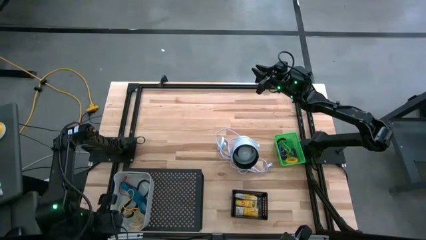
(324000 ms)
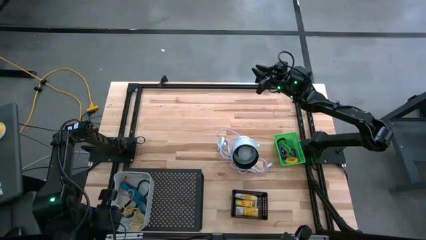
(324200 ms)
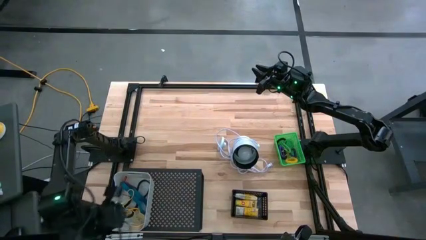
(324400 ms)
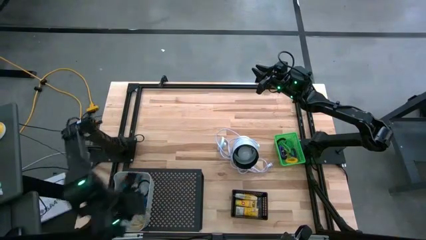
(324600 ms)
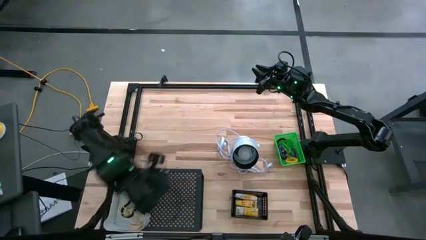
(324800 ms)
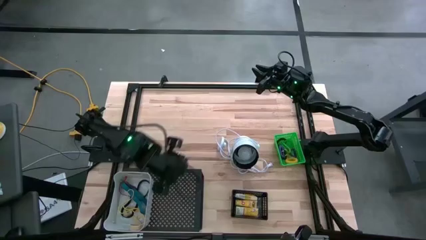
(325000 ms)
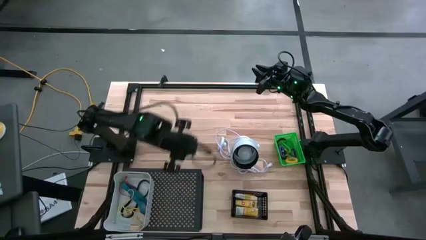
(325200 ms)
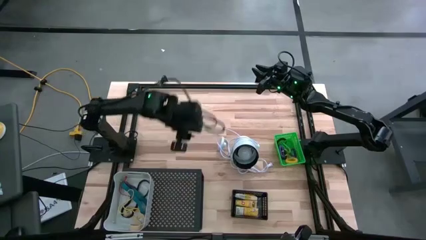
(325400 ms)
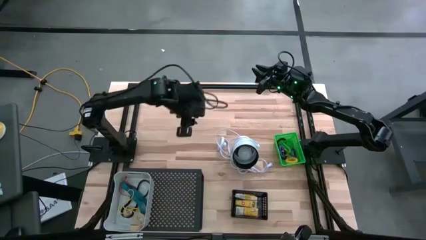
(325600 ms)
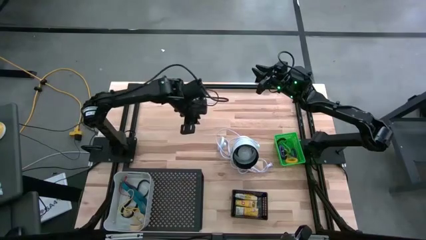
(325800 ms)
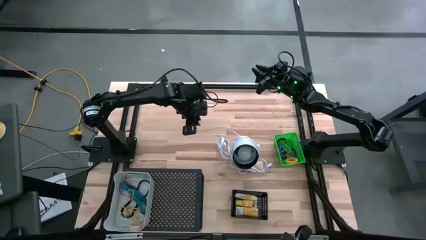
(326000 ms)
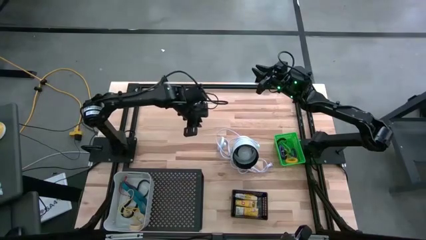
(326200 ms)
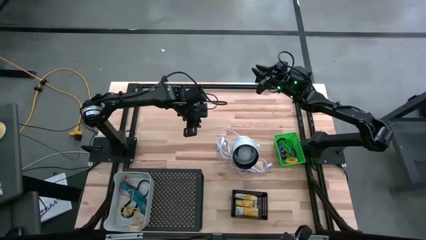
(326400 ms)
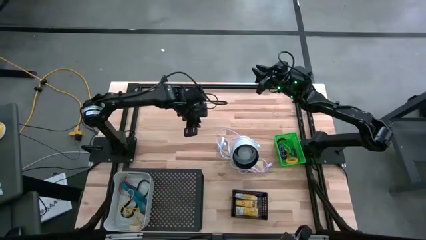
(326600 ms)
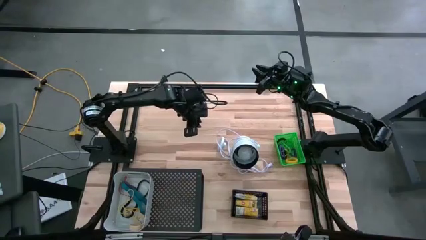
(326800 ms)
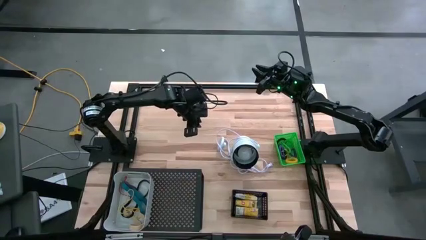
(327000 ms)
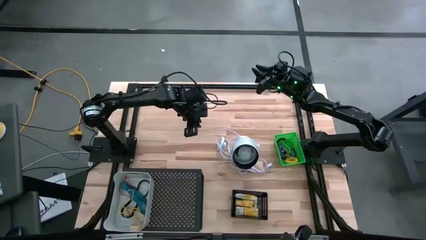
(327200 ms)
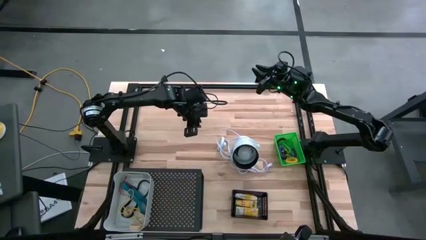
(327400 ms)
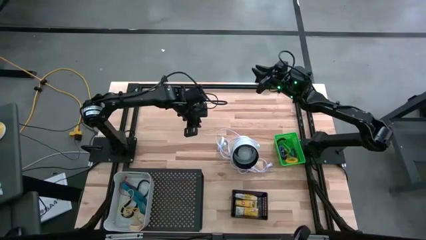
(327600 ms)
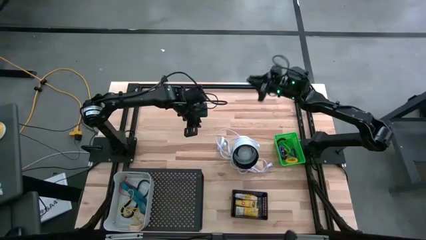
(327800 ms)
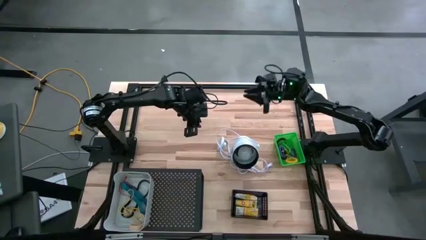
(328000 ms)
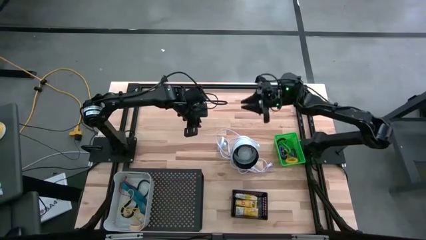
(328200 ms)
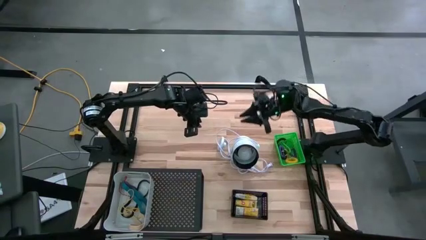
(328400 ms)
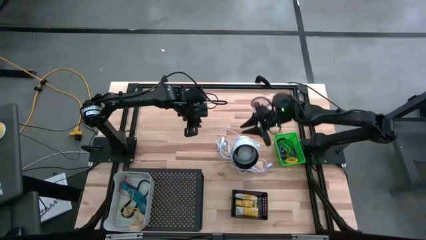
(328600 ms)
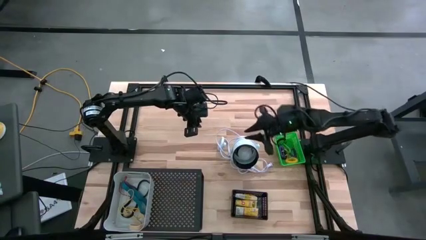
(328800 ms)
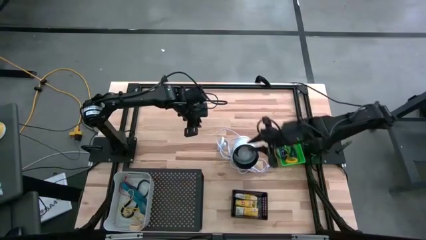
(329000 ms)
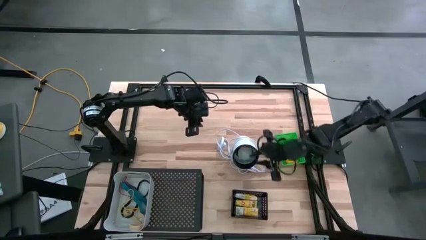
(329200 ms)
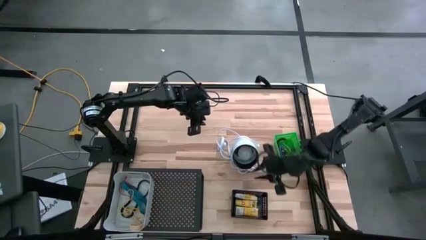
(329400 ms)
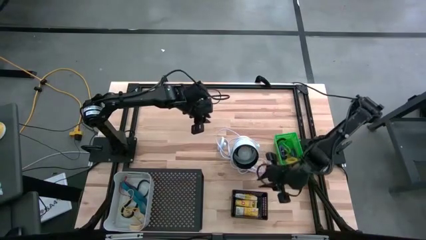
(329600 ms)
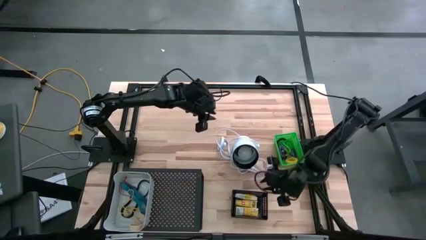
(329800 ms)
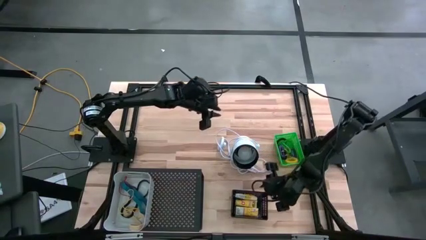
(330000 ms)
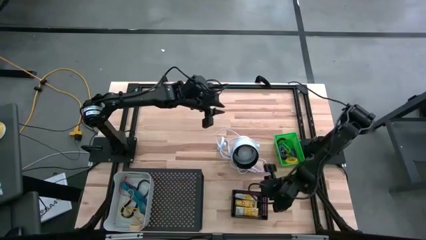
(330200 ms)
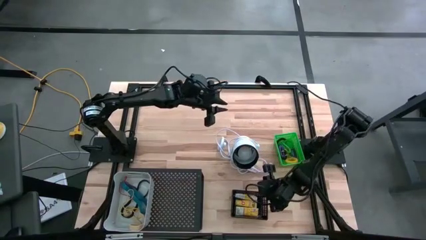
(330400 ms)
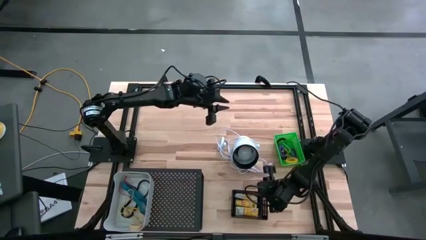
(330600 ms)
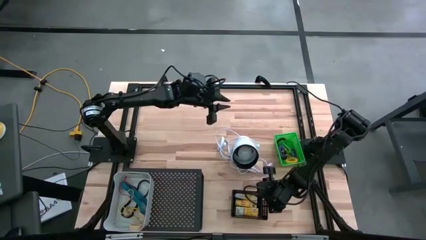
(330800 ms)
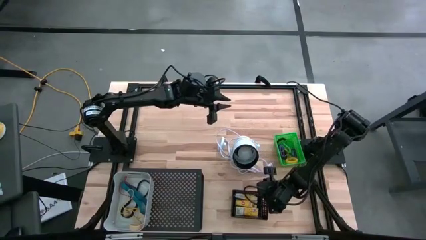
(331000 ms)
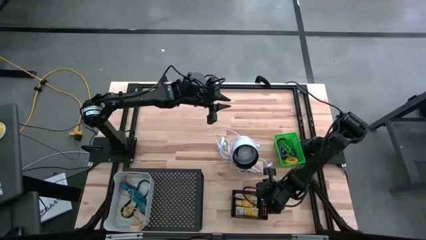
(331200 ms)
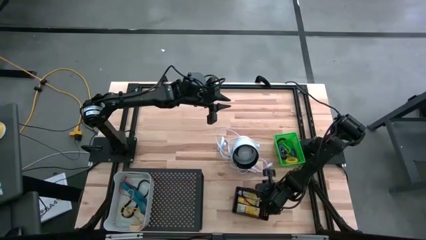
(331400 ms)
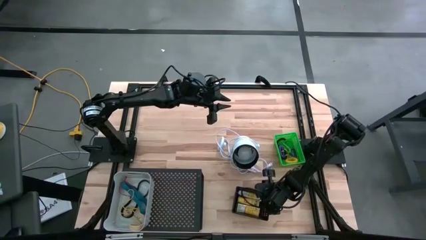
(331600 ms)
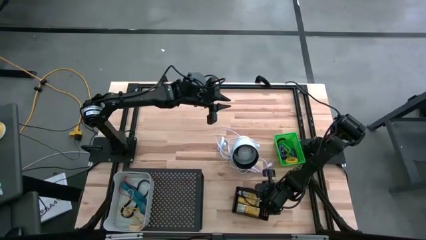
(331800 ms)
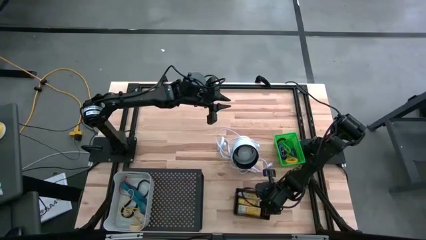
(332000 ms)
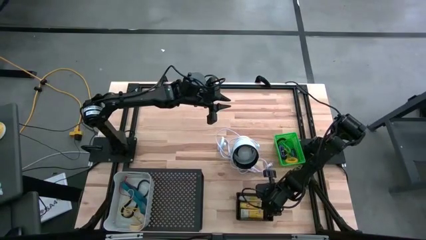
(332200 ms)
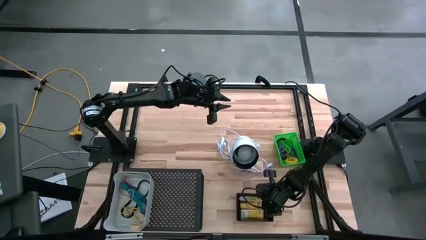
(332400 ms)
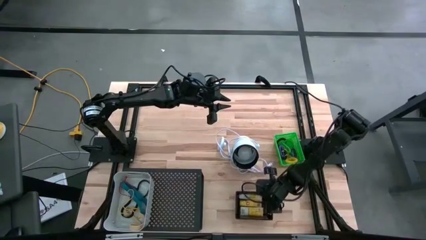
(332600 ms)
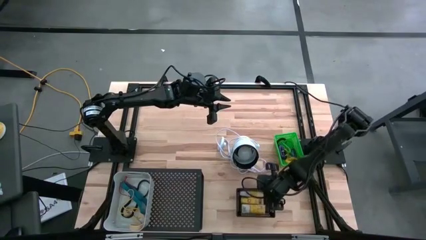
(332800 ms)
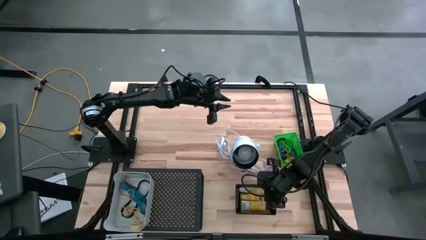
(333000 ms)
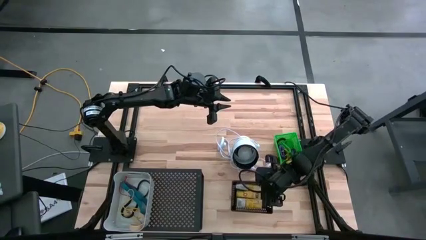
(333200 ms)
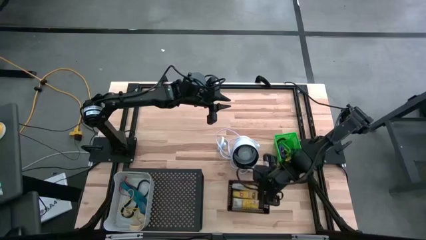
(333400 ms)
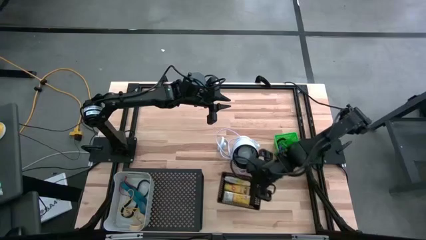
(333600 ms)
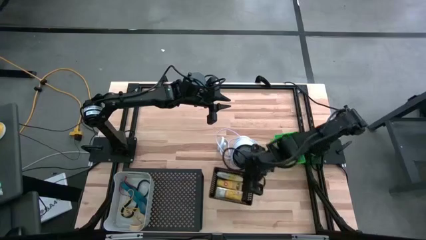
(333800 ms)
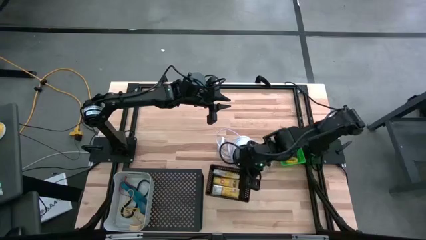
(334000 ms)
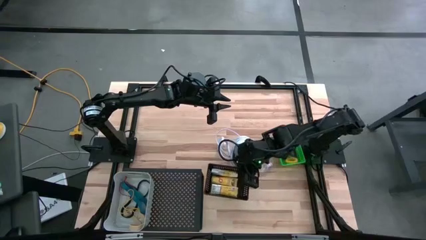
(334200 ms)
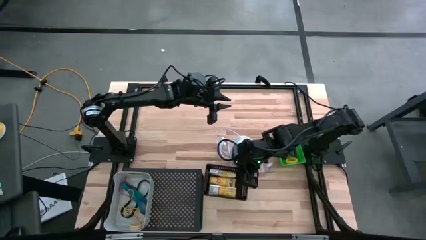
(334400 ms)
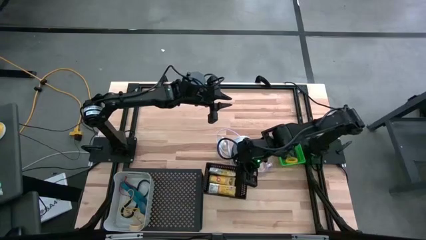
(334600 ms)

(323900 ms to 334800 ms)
Task: Pick & Place Office Desk Supplies
Put the black bin on the shelf

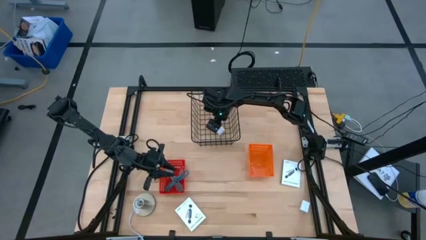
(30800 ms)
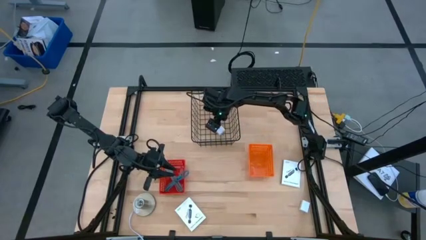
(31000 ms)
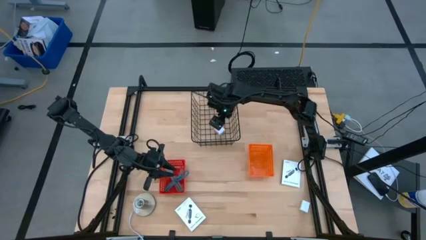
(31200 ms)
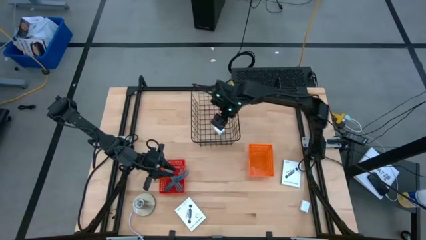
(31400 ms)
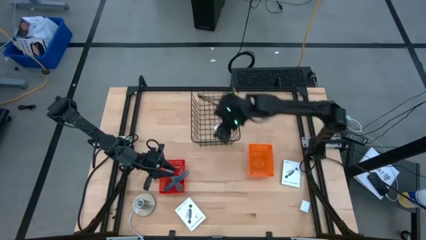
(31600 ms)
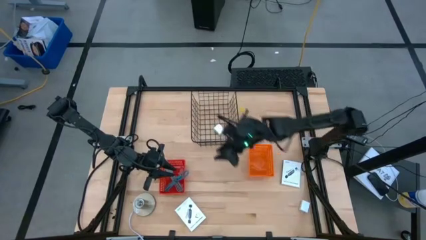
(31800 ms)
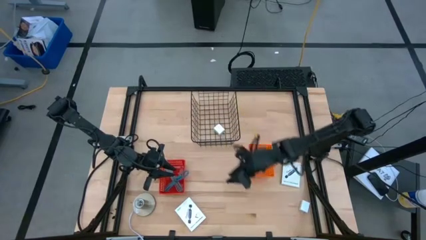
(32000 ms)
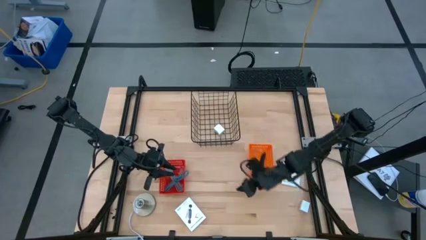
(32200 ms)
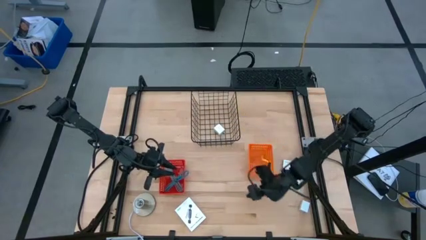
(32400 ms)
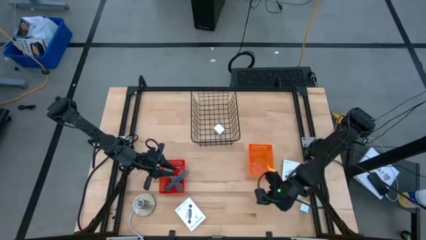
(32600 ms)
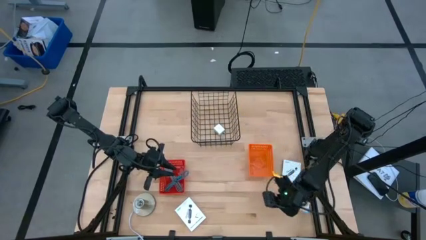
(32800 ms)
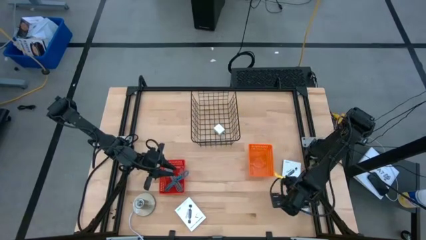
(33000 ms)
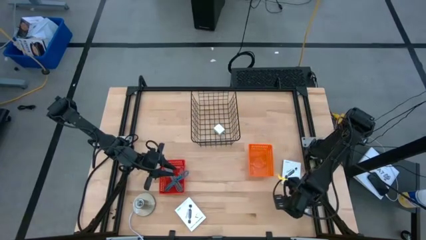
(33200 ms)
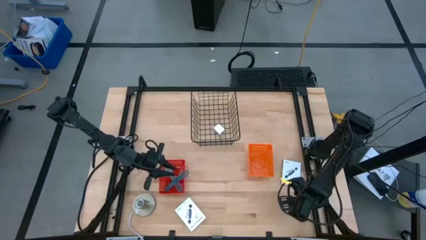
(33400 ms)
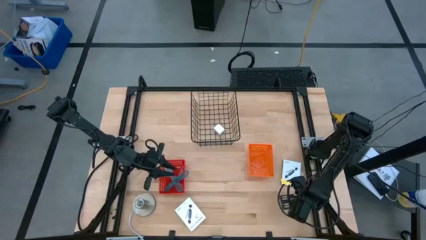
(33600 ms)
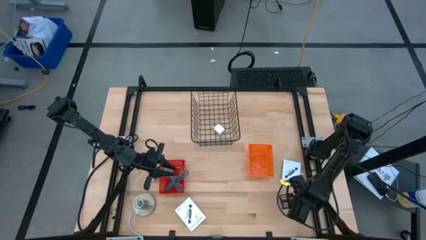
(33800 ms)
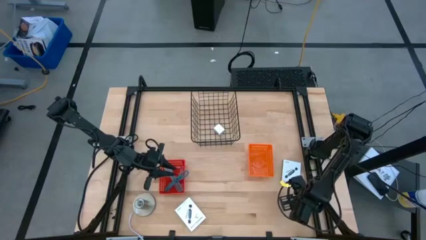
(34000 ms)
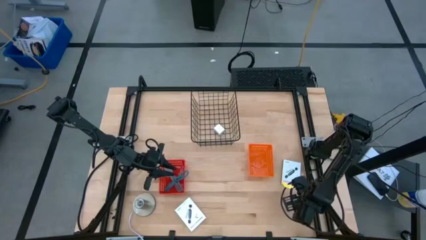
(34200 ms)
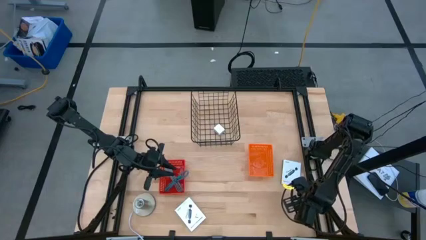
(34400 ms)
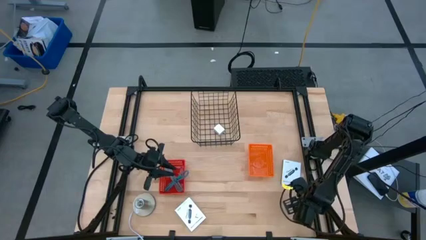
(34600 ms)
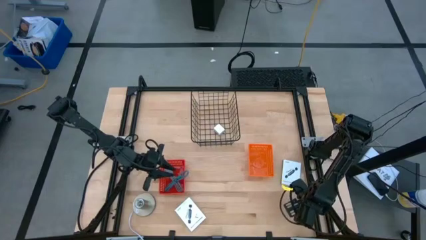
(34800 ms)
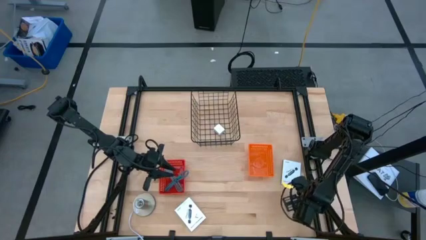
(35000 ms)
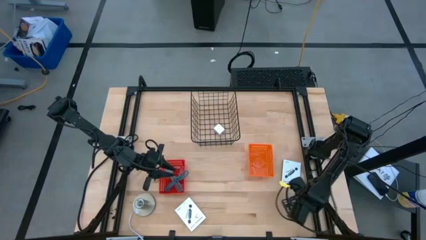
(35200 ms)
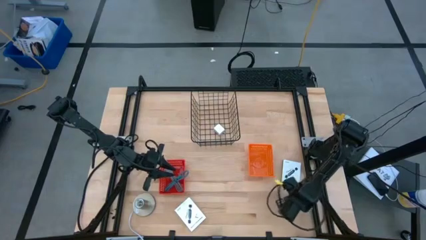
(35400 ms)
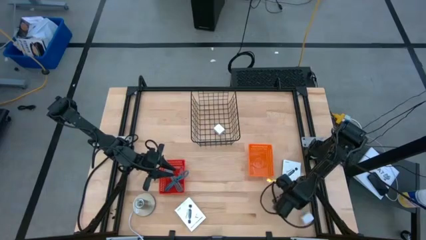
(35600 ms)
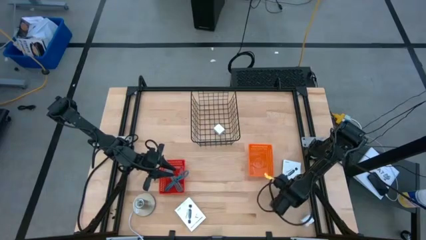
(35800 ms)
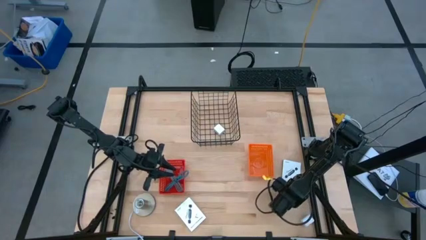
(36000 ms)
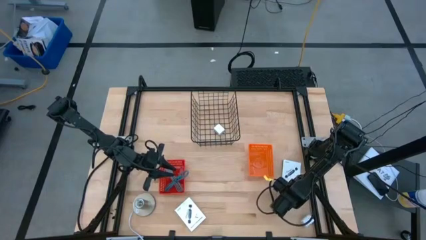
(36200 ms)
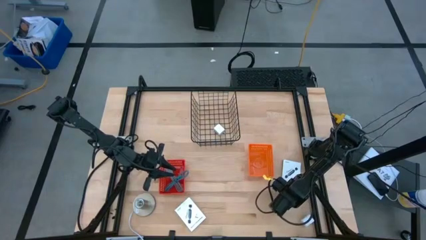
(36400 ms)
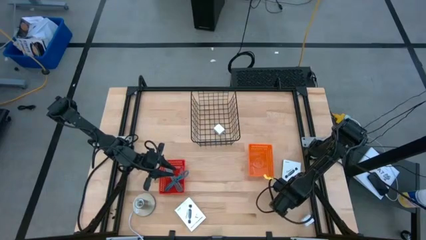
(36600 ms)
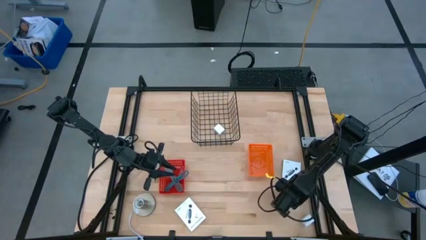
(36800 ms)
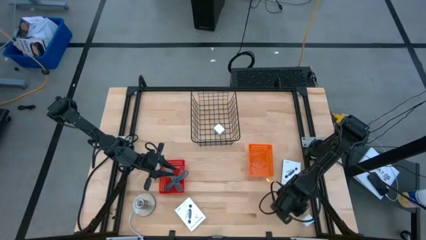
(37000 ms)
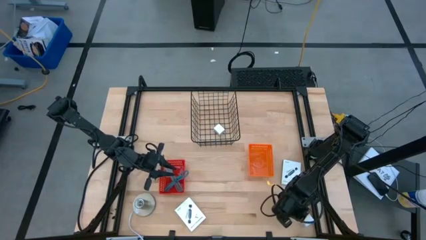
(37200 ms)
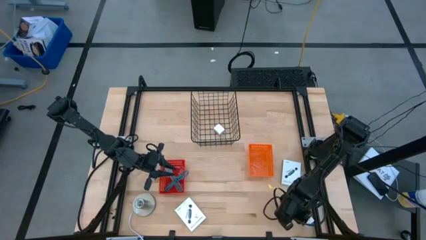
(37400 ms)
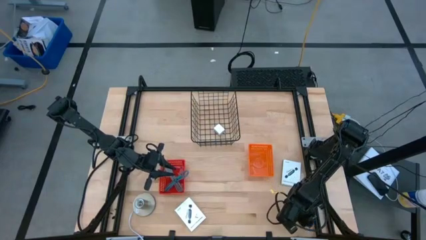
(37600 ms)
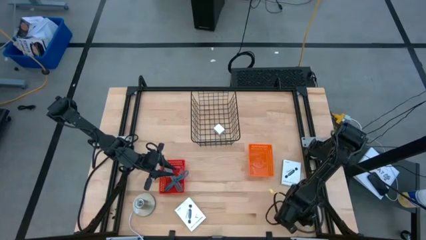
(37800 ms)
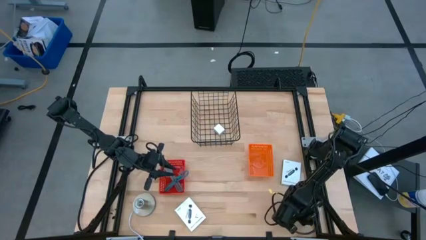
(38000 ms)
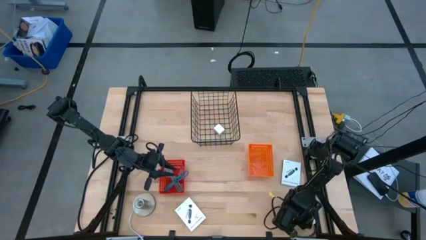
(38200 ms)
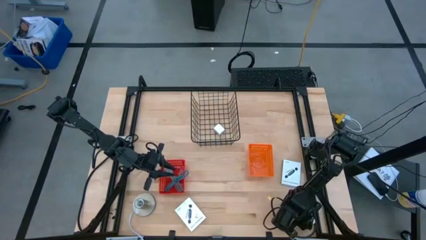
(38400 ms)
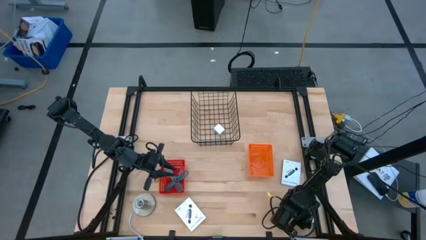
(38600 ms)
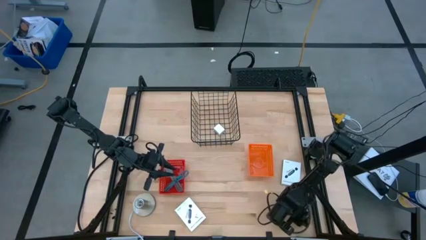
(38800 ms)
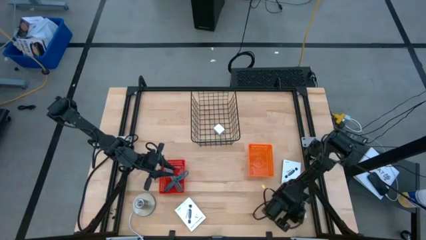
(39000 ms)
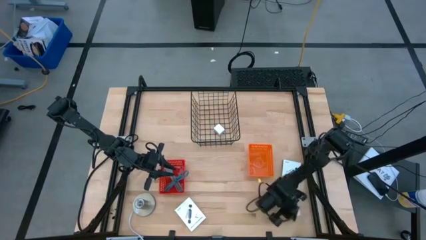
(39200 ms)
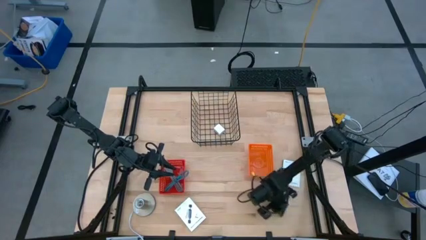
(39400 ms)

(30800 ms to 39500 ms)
Task: Pick and place items into bin
Put the white charger adapter into the black wire basket
